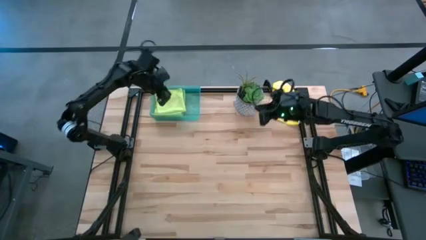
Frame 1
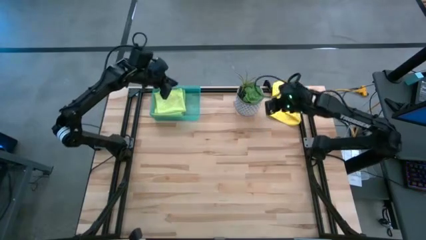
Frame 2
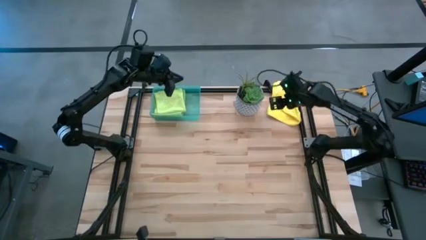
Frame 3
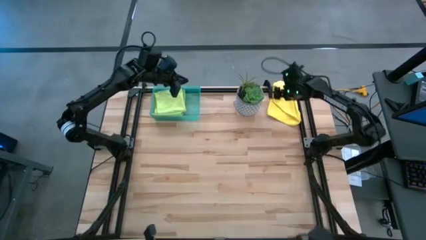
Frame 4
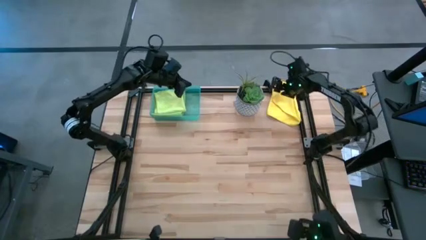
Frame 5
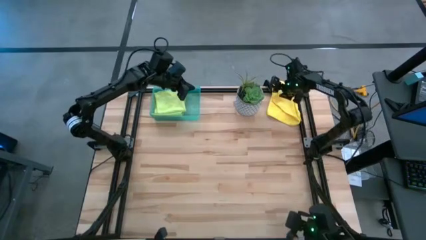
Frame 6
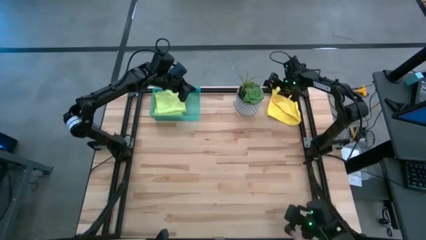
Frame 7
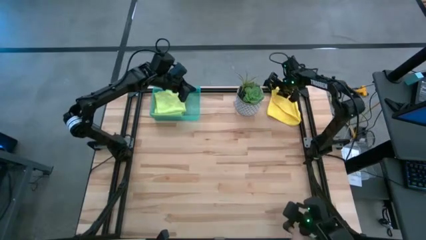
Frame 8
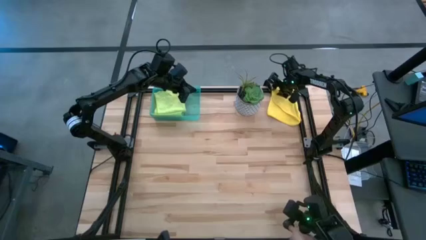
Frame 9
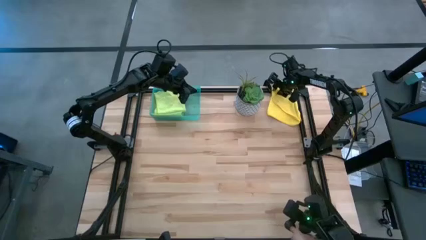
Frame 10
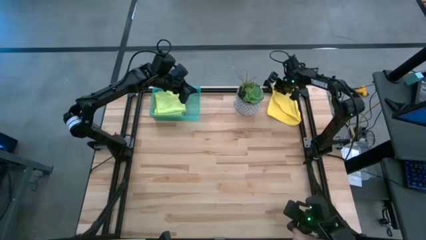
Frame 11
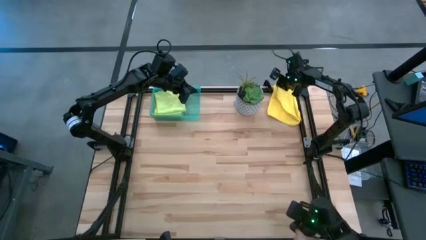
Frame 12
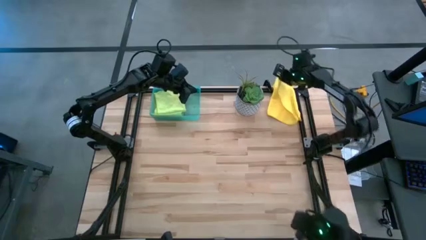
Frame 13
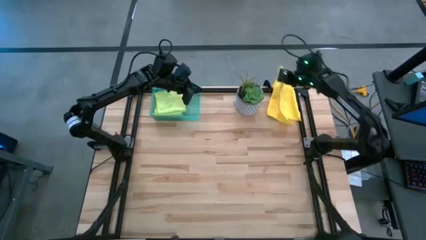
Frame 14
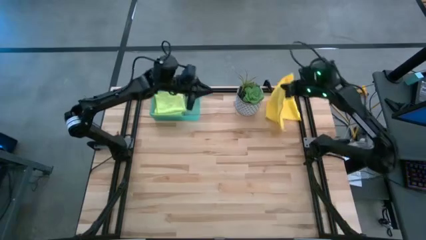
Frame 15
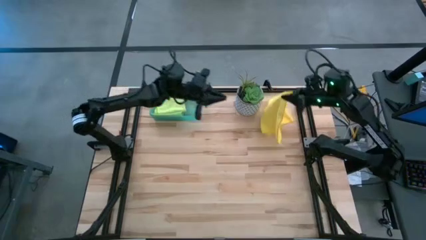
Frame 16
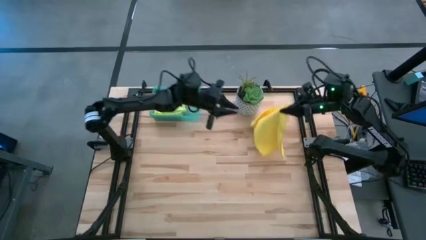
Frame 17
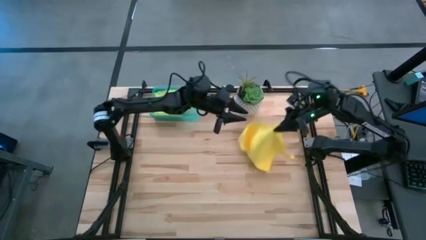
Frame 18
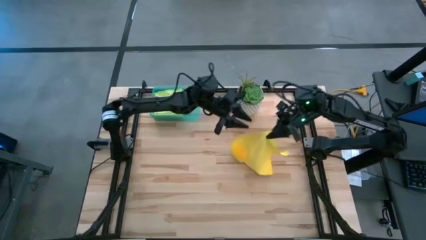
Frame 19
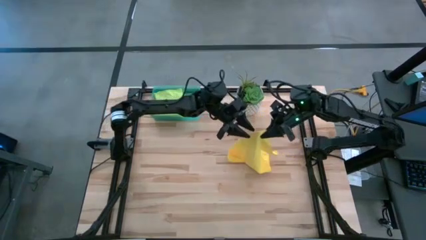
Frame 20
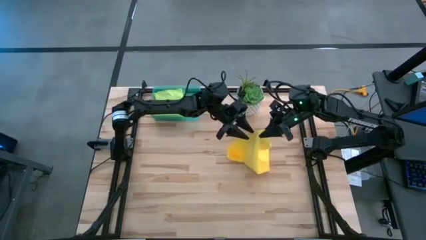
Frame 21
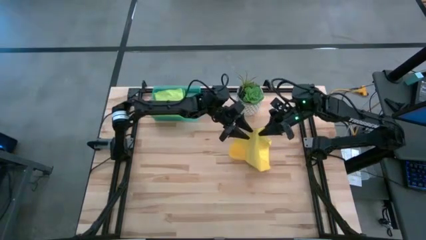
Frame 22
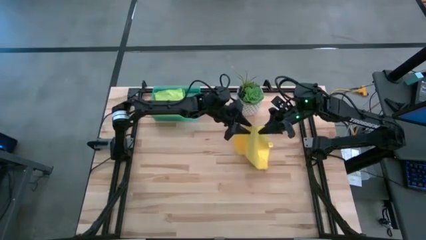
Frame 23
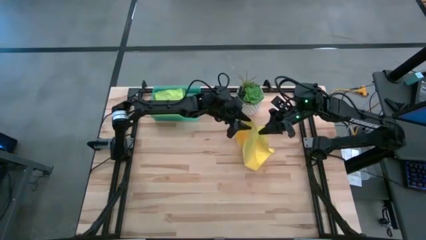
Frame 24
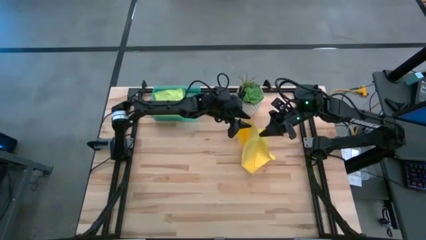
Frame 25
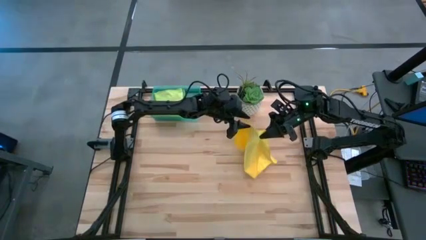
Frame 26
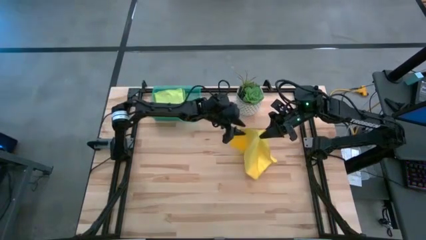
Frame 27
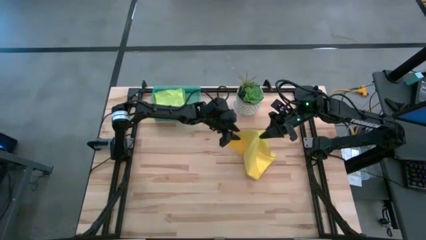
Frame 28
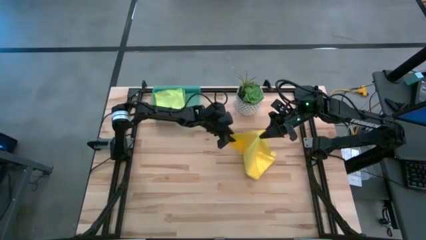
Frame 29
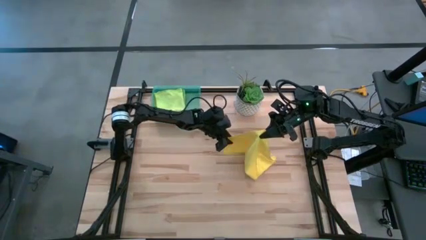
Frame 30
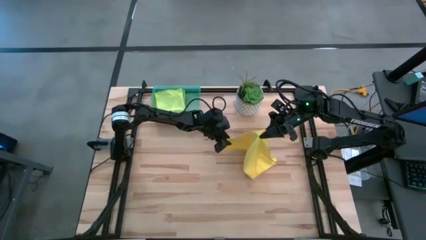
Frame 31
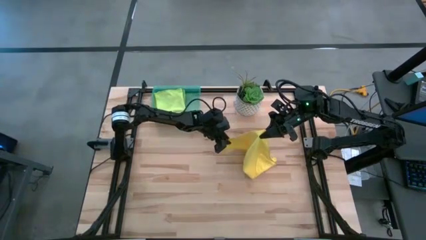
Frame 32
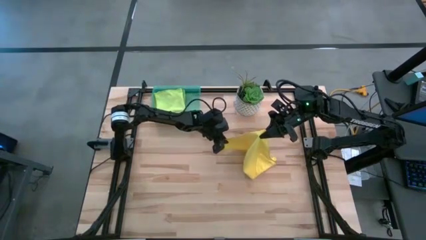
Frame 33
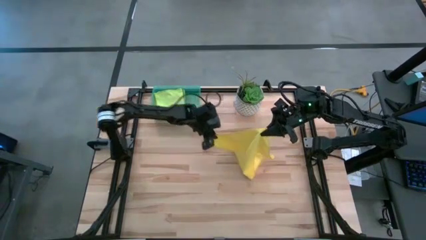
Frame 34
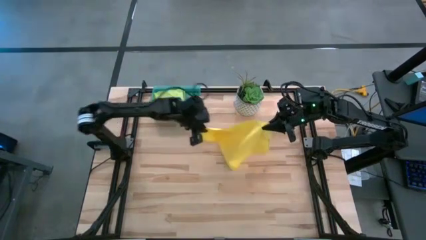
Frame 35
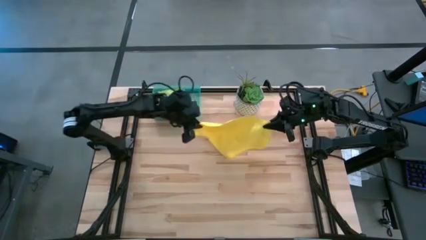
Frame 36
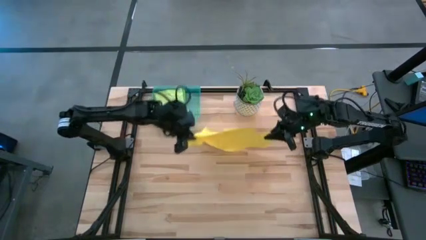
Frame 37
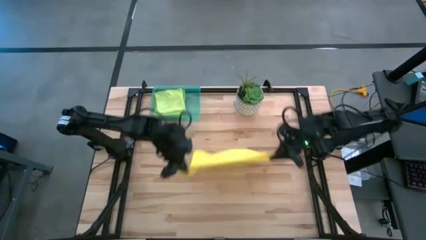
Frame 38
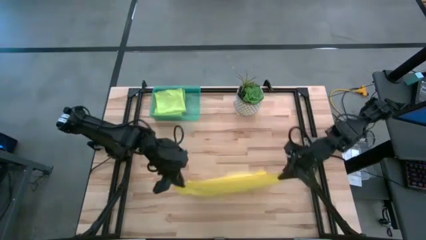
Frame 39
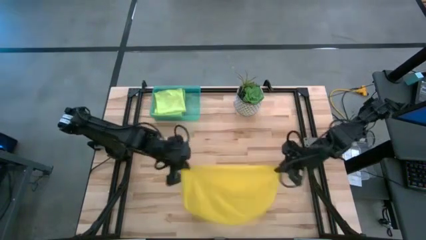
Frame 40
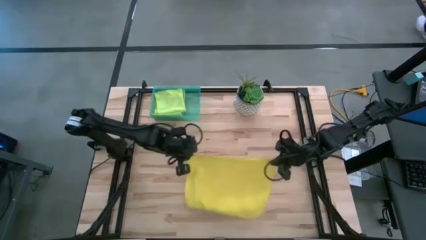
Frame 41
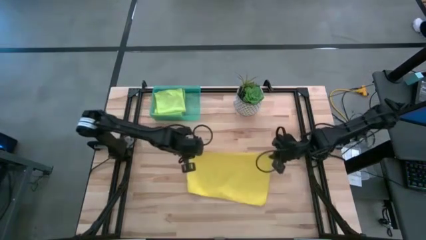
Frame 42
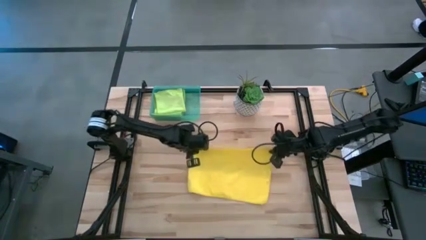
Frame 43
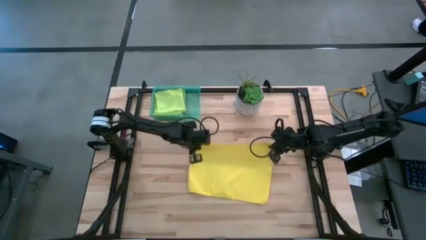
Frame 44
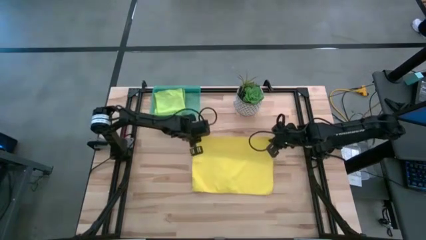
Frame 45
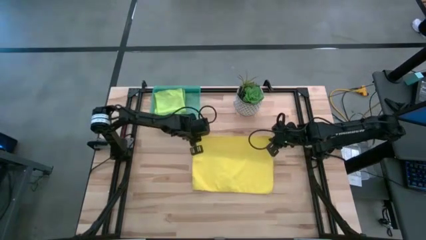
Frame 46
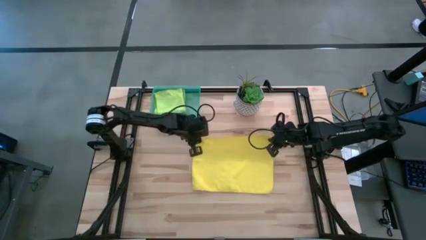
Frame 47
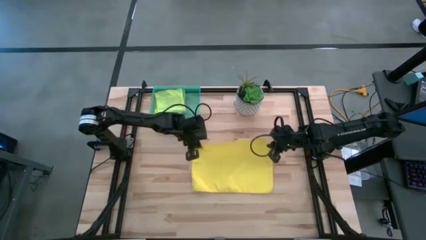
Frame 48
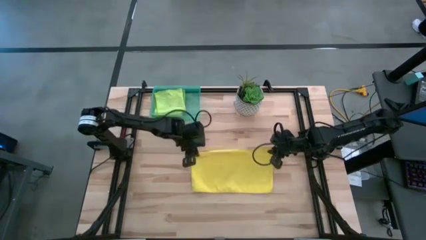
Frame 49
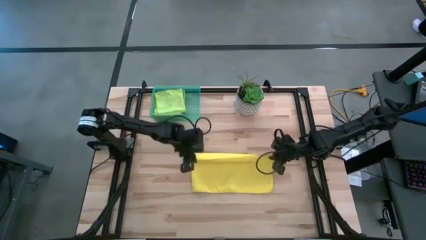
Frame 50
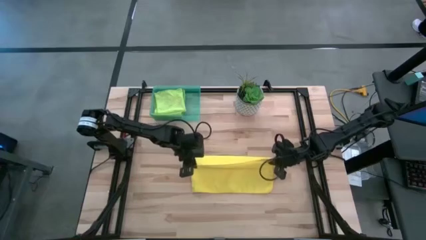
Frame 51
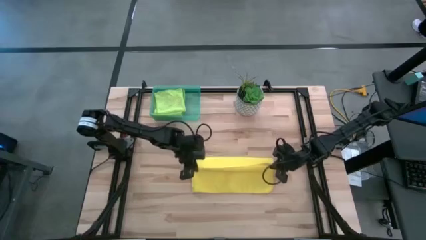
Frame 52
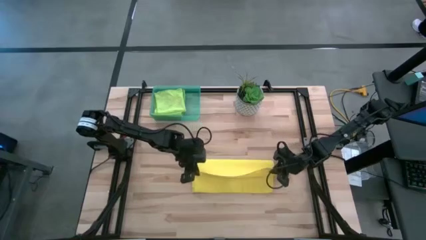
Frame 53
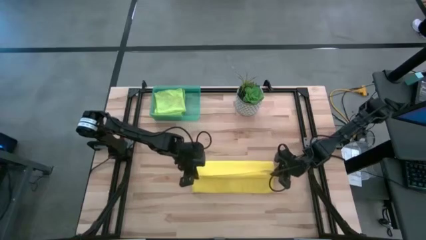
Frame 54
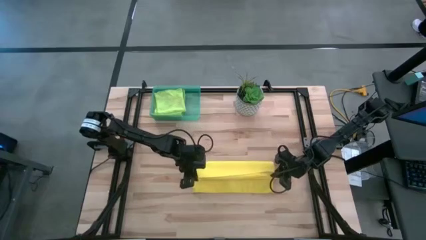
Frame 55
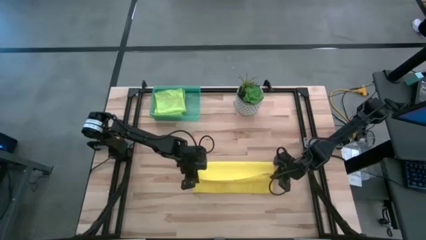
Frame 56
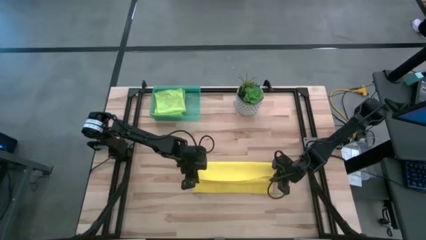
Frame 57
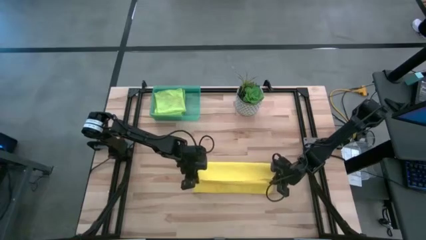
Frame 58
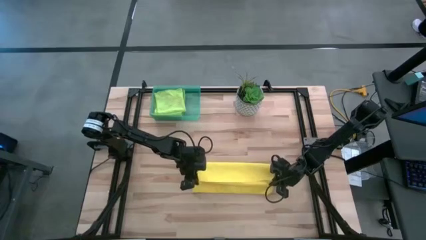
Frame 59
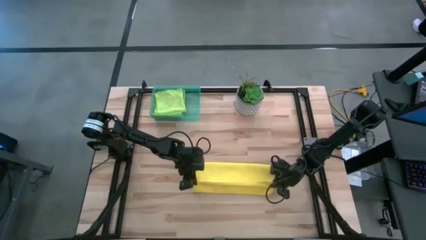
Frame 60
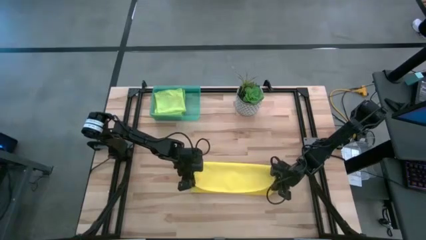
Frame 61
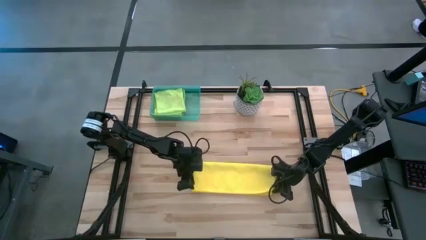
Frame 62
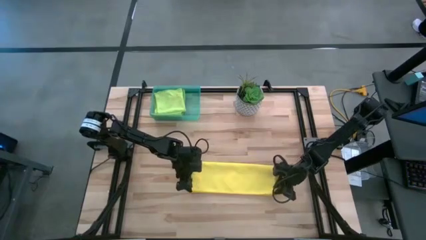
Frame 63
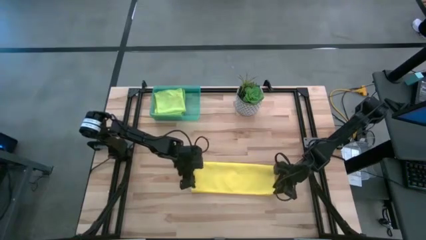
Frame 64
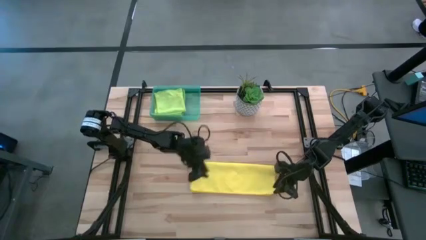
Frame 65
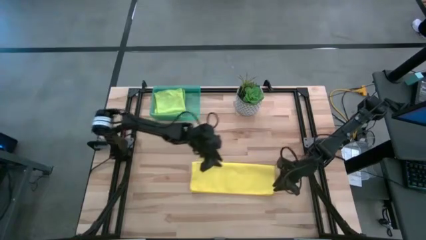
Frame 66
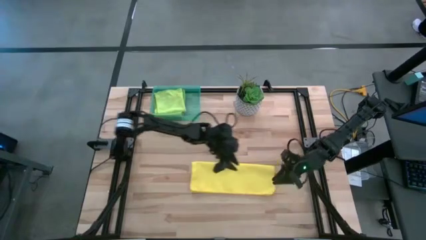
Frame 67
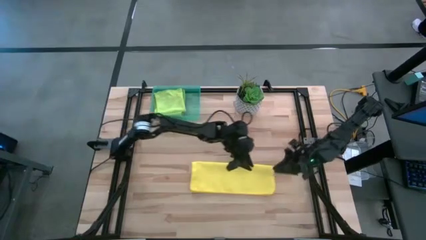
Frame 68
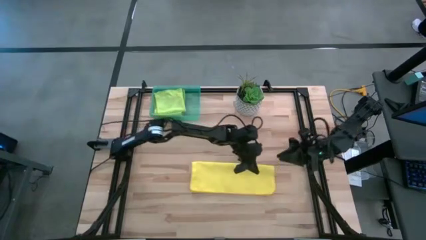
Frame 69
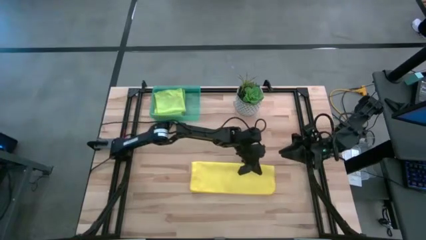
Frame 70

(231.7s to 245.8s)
Task: Fold microfiber towels
Fold the yellow microfiber cloth
